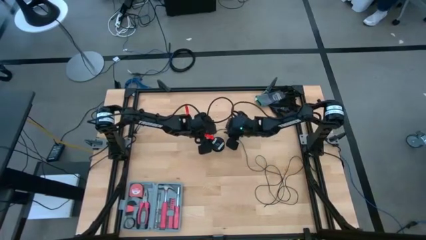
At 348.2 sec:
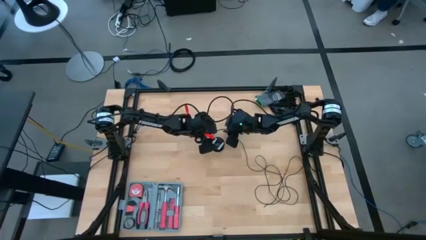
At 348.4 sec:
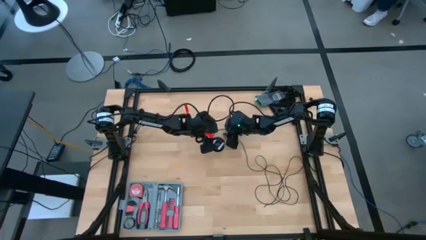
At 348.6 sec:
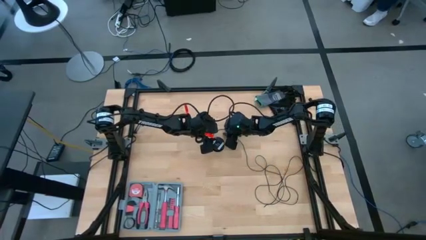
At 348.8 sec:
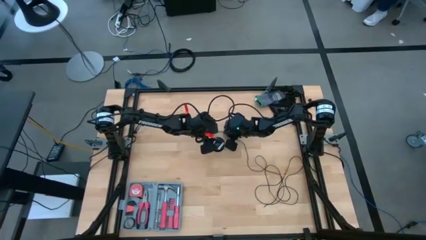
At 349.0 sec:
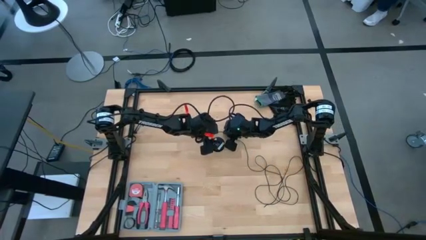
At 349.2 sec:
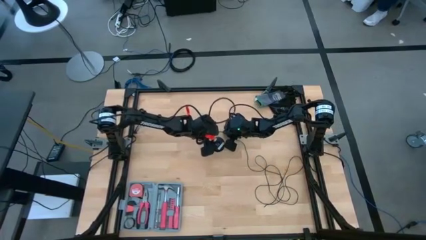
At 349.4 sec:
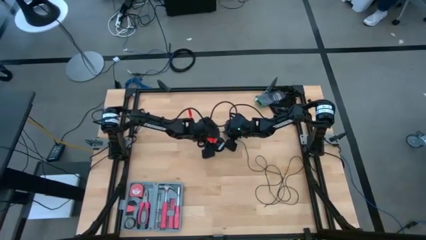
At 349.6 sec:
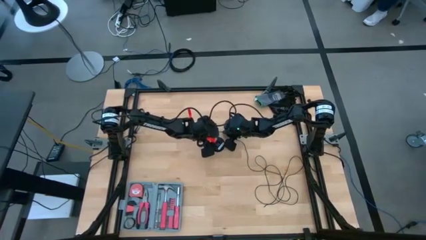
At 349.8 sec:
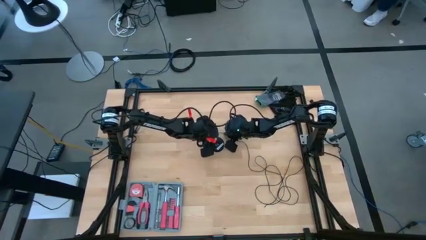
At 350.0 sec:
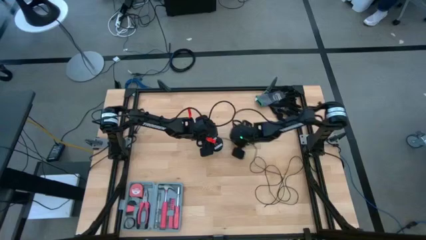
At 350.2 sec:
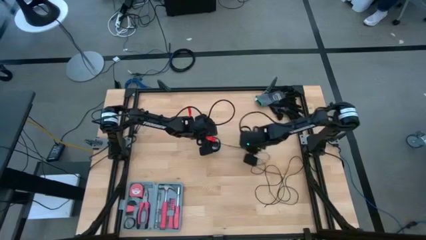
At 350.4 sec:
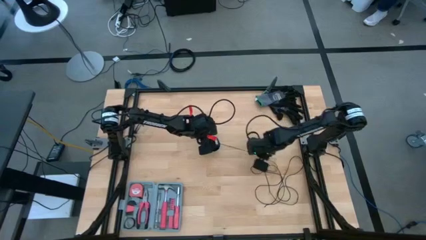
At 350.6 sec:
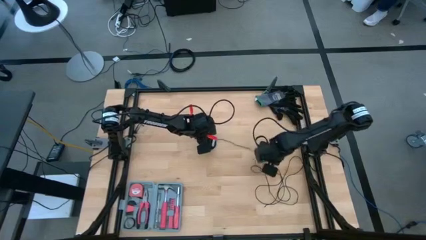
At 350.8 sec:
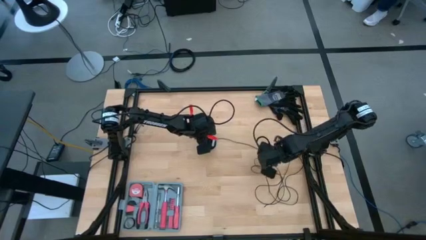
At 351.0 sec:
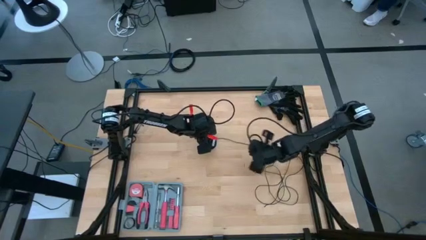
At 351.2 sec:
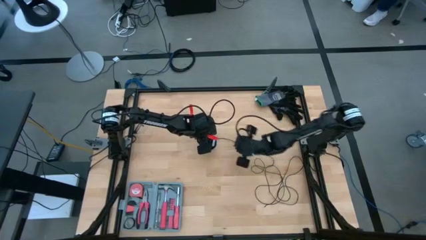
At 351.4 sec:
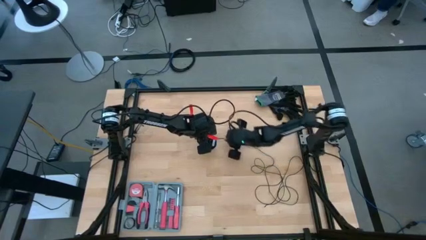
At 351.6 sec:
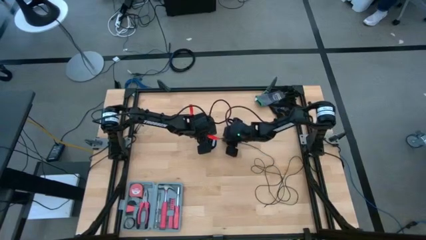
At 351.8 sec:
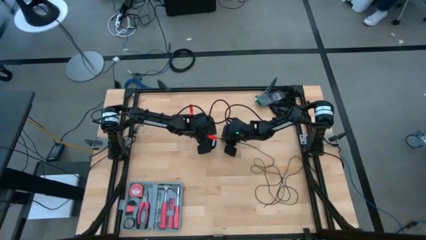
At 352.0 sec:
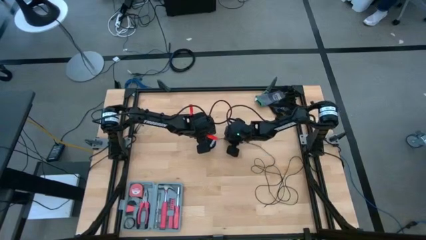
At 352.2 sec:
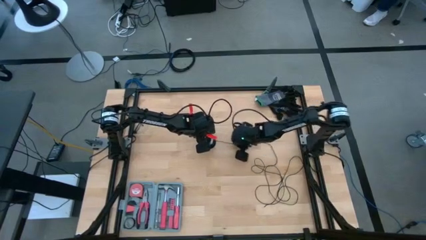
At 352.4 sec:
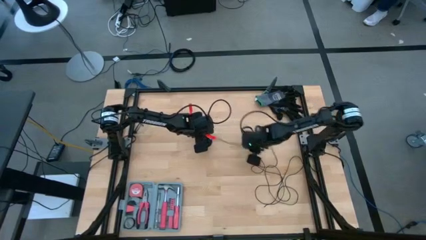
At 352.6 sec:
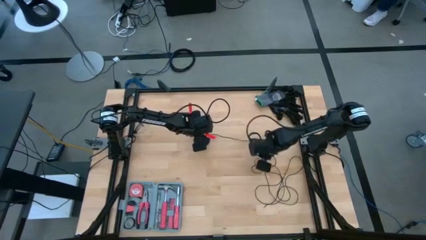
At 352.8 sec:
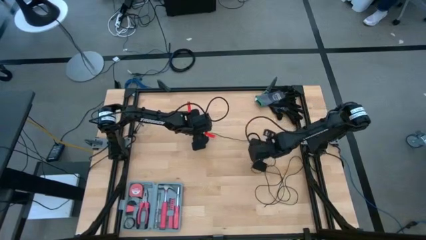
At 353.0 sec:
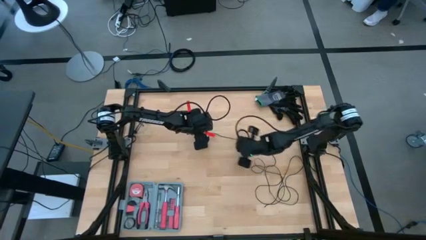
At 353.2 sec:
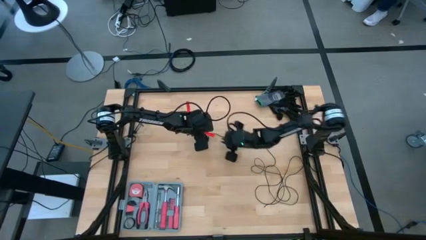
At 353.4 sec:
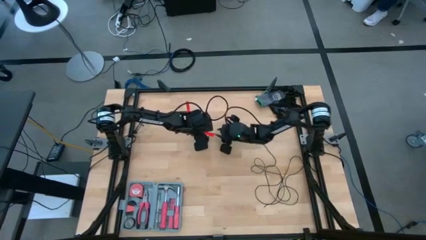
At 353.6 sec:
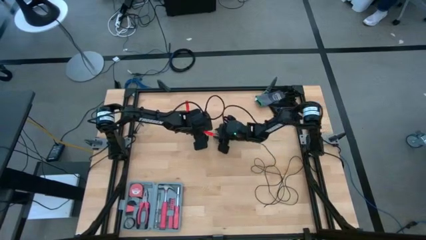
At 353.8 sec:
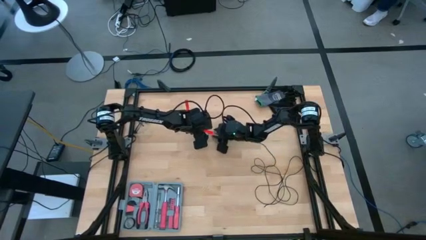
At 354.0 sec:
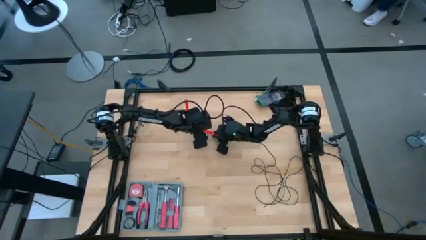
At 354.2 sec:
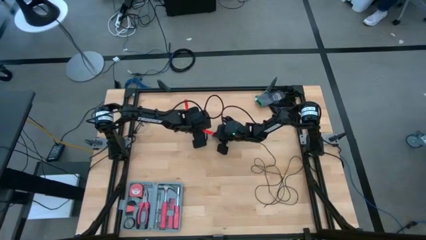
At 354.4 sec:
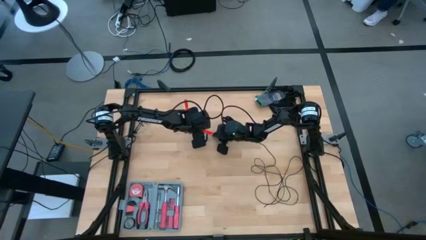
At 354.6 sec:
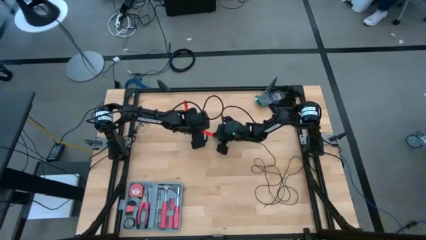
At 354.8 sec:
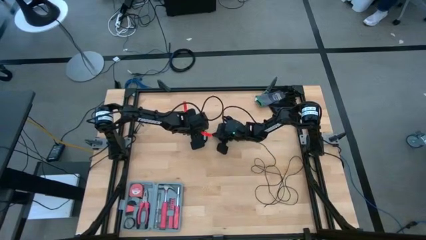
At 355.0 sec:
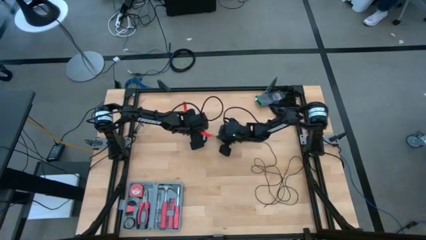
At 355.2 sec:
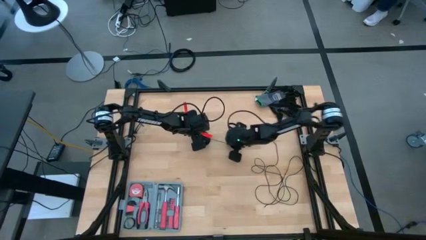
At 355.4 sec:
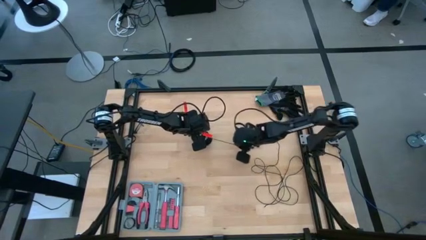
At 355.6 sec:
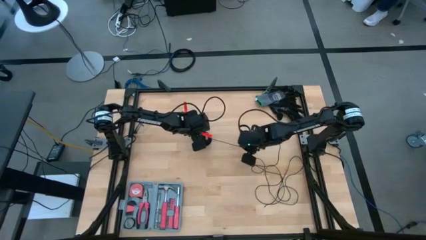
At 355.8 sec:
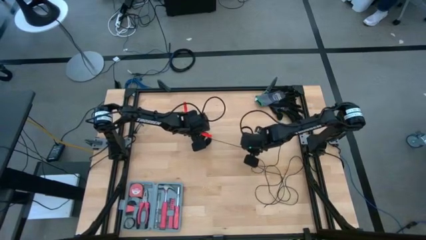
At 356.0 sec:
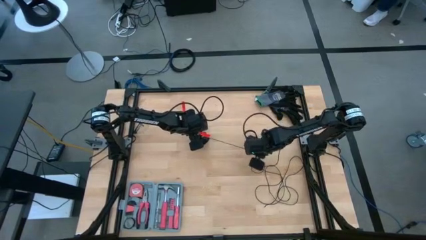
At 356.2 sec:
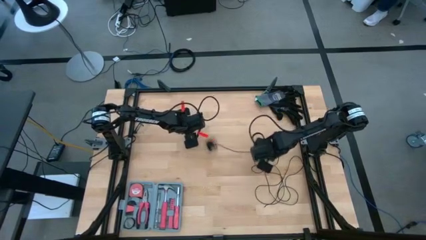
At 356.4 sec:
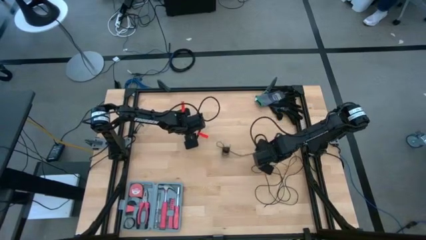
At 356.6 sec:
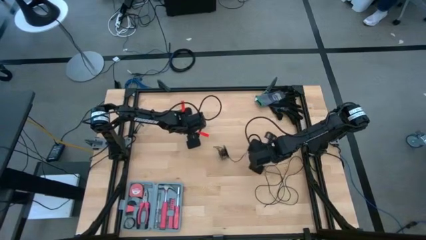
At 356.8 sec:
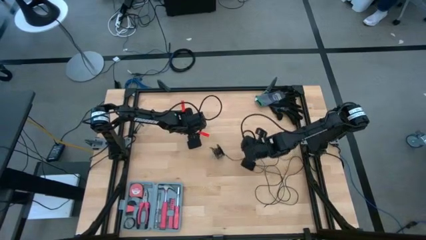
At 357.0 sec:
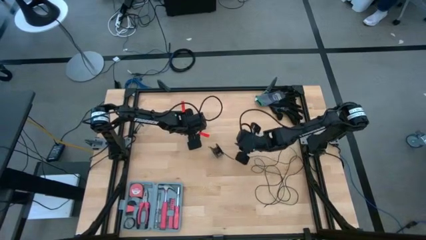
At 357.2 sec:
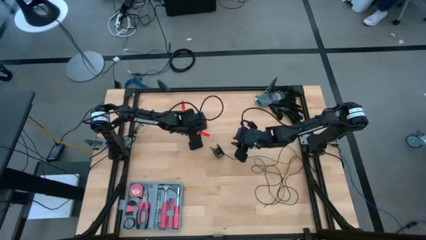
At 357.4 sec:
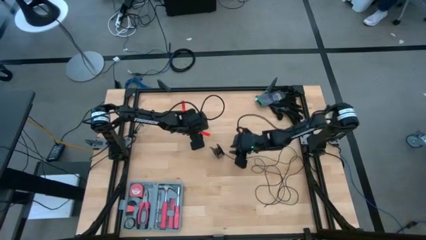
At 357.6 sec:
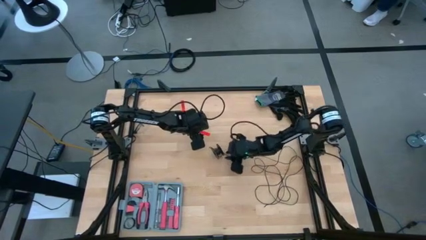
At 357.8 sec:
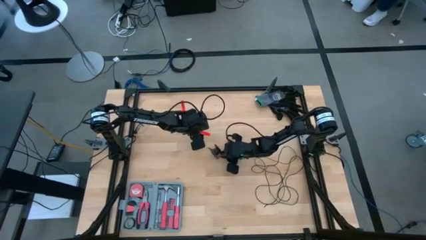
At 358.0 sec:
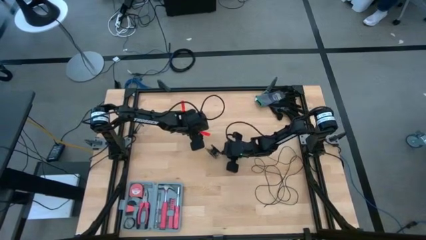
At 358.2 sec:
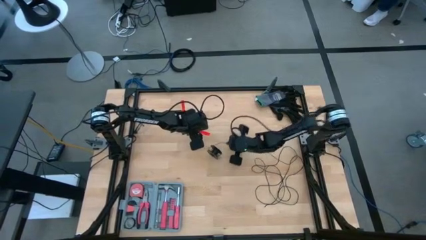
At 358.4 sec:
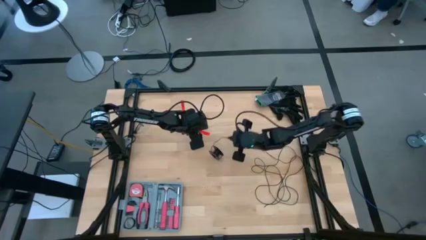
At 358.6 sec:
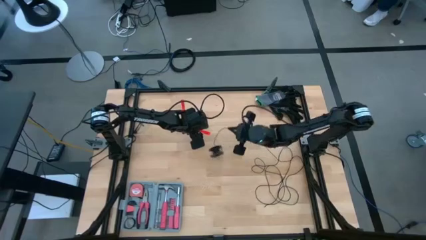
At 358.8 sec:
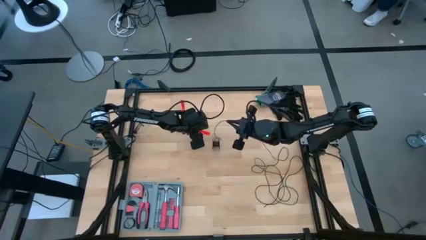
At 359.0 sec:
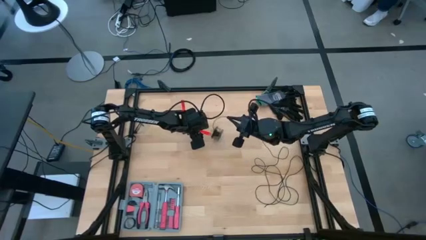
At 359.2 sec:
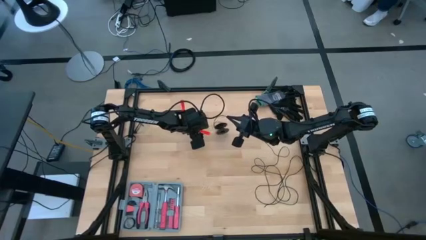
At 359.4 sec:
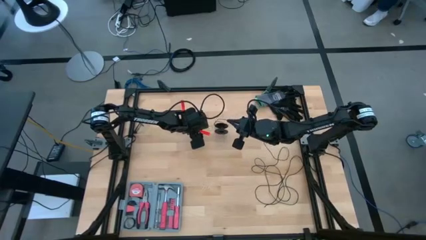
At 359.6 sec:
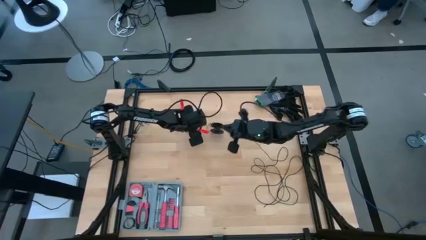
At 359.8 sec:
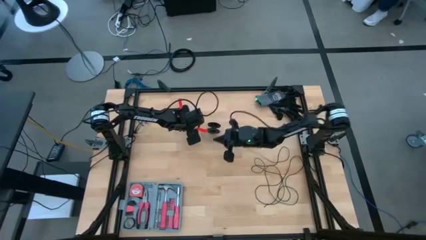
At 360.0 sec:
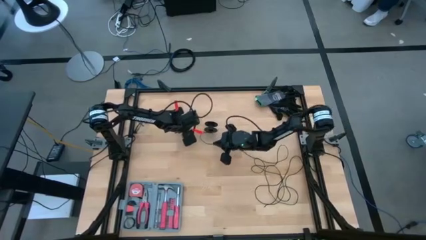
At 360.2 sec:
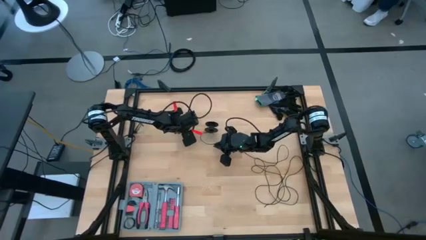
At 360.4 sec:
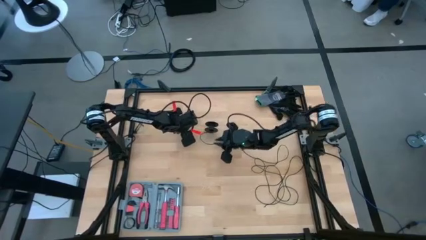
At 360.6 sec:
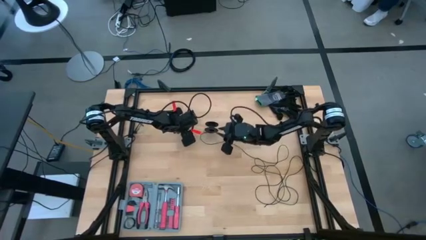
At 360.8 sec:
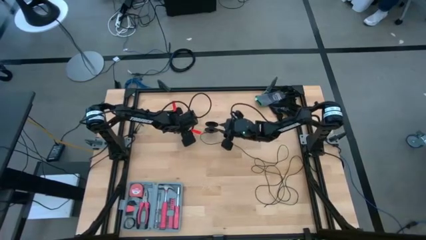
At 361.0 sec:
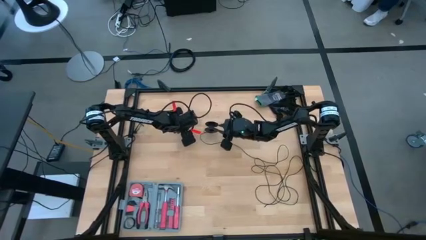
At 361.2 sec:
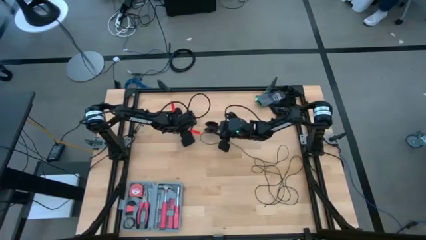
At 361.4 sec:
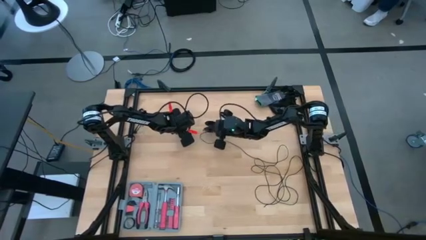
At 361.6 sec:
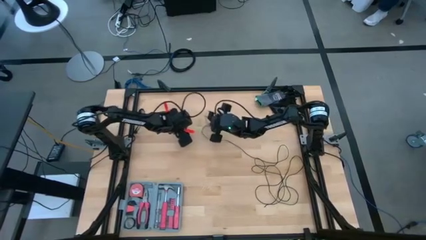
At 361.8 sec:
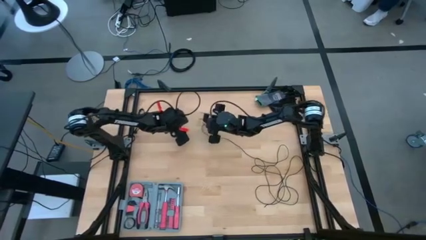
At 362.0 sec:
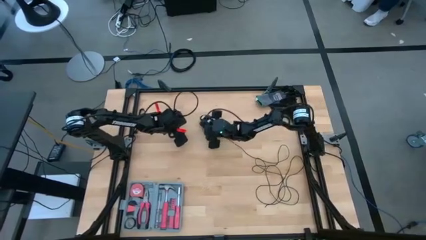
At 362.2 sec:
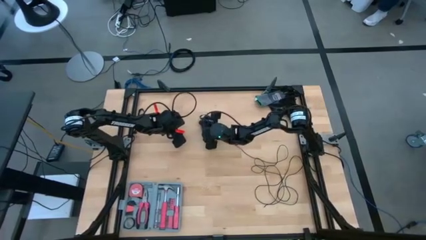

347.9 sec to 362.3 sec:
Task: Coil cords
Uncoil the black wire from the spool
